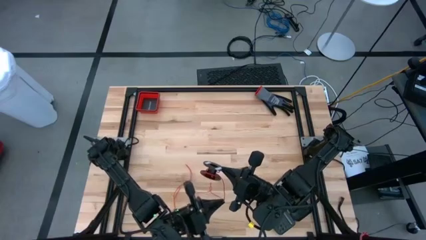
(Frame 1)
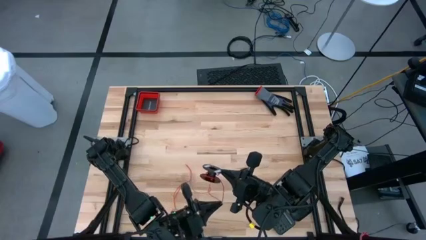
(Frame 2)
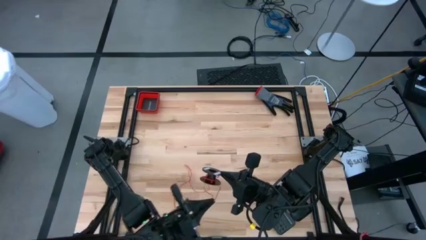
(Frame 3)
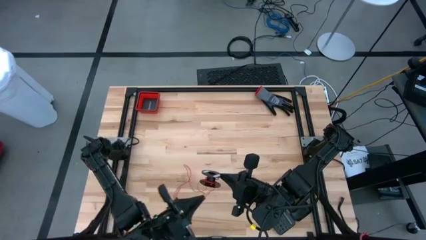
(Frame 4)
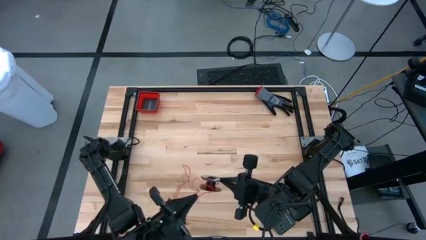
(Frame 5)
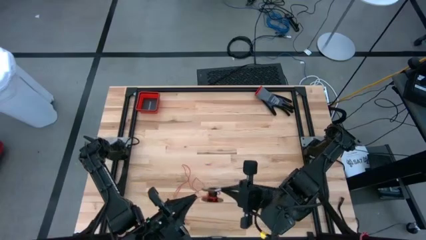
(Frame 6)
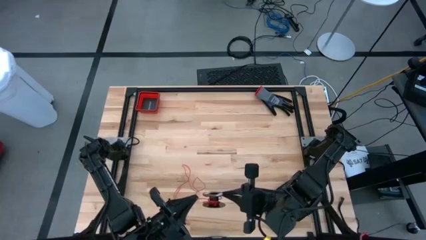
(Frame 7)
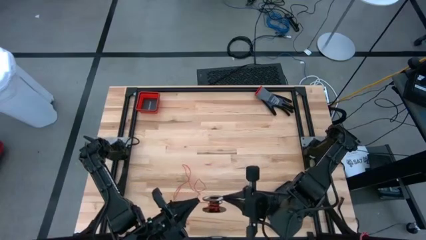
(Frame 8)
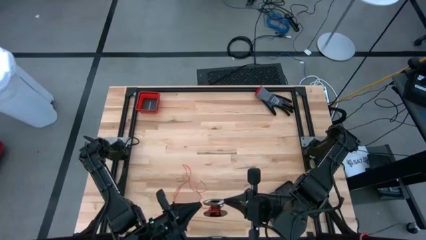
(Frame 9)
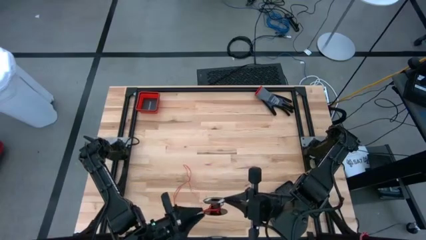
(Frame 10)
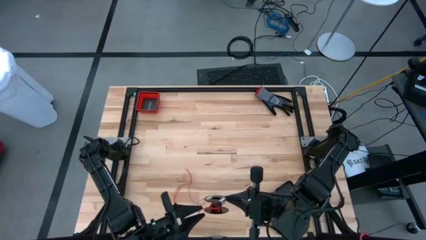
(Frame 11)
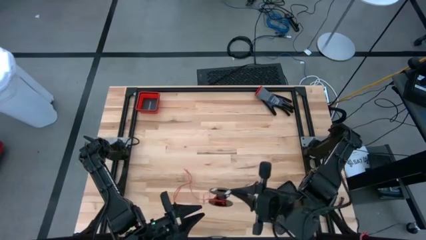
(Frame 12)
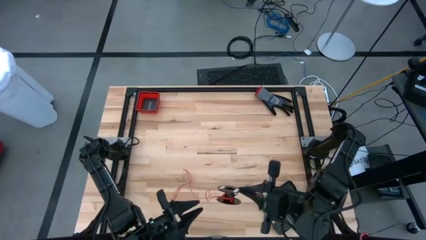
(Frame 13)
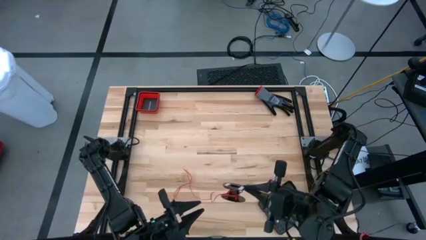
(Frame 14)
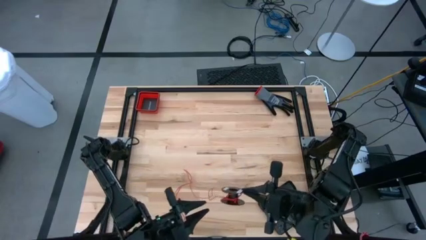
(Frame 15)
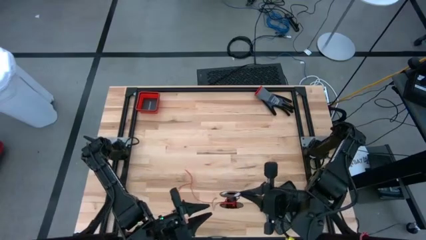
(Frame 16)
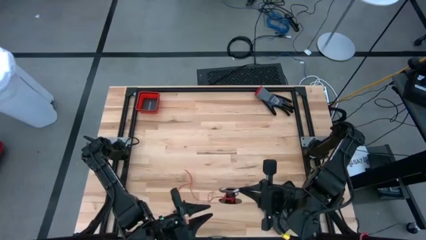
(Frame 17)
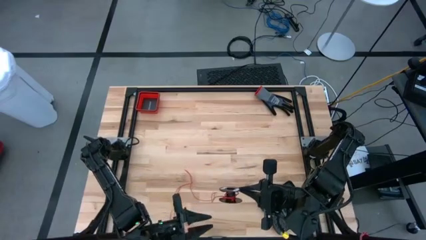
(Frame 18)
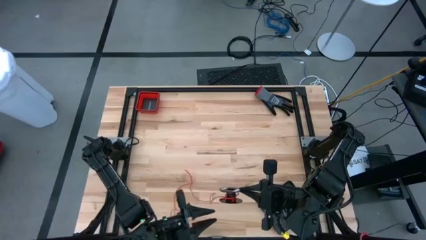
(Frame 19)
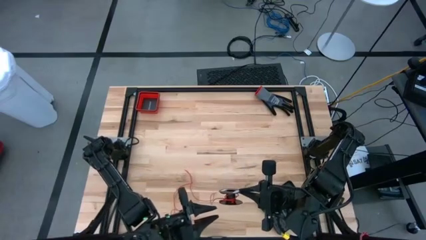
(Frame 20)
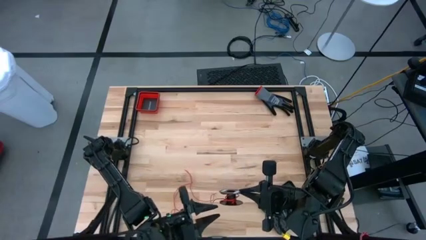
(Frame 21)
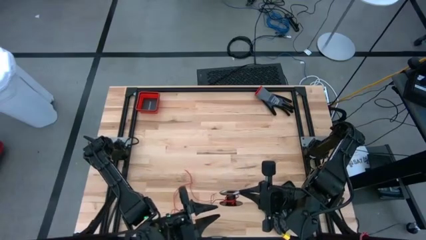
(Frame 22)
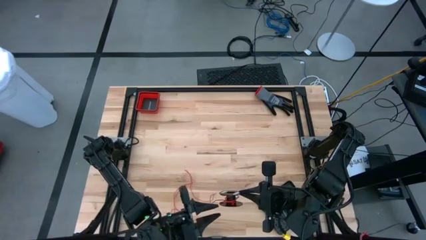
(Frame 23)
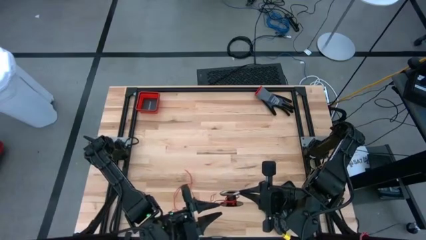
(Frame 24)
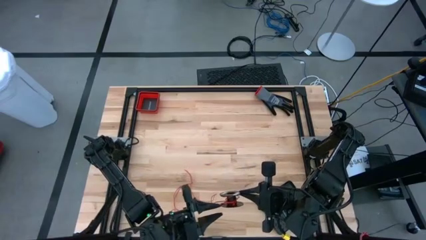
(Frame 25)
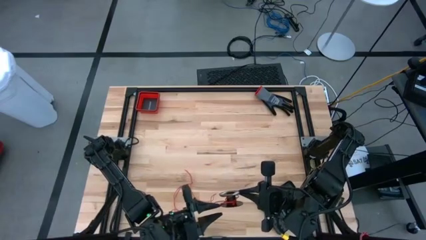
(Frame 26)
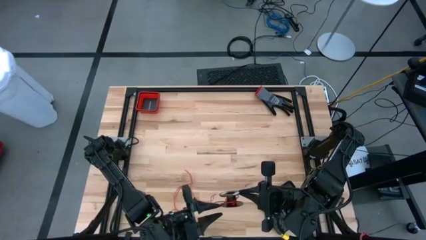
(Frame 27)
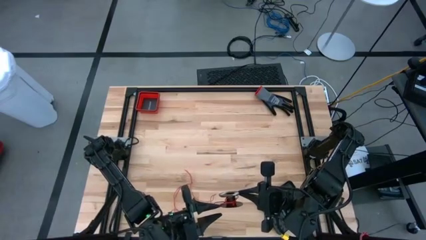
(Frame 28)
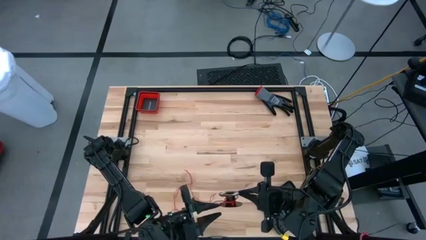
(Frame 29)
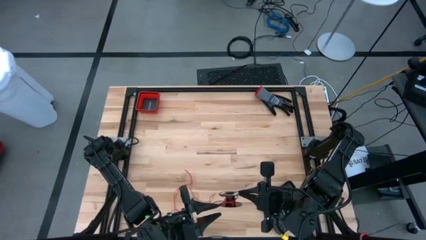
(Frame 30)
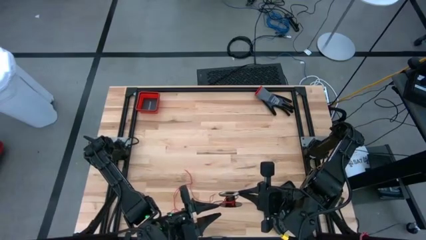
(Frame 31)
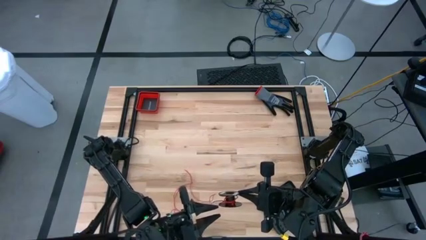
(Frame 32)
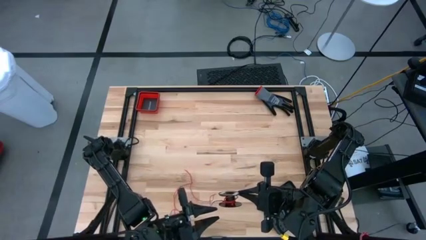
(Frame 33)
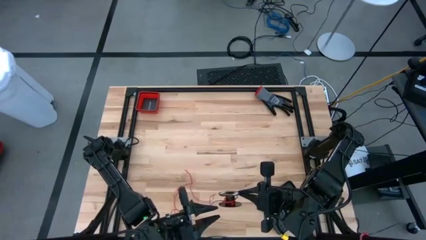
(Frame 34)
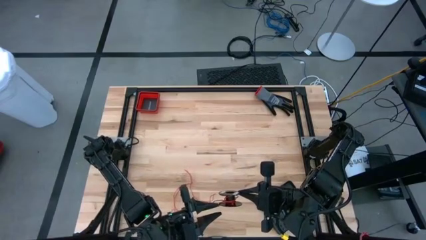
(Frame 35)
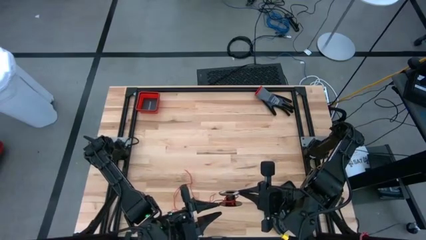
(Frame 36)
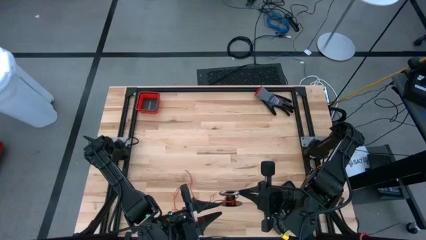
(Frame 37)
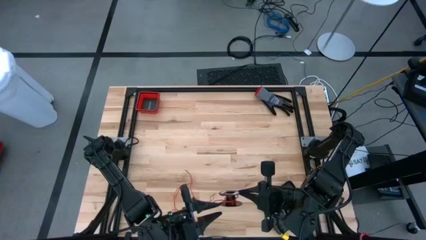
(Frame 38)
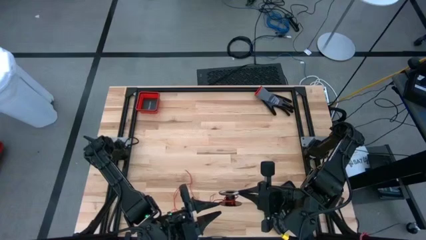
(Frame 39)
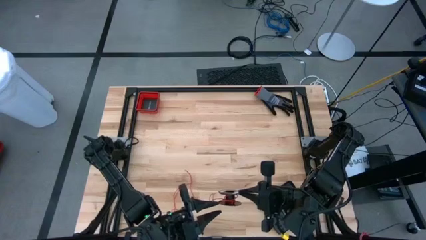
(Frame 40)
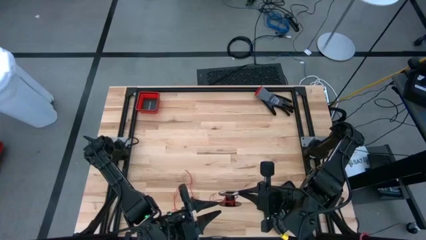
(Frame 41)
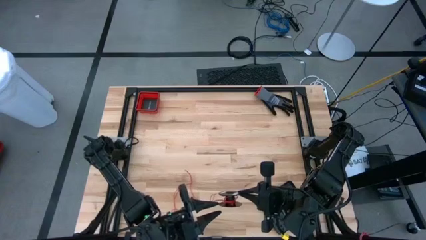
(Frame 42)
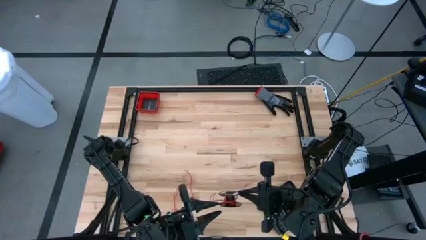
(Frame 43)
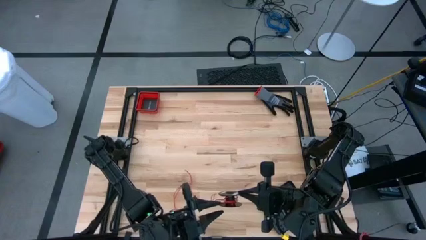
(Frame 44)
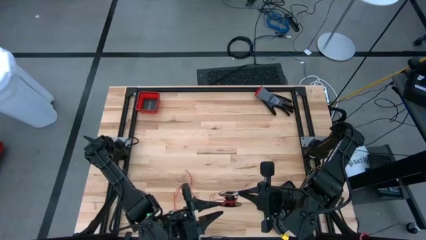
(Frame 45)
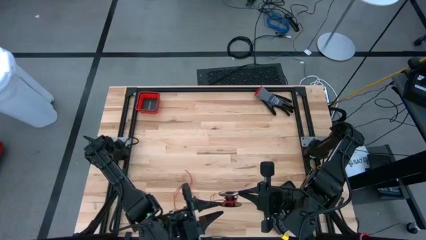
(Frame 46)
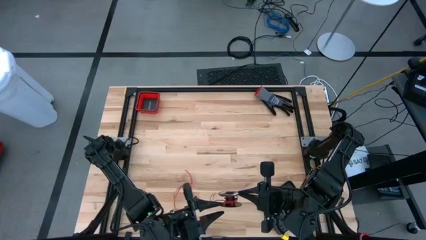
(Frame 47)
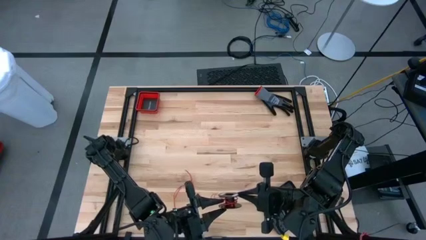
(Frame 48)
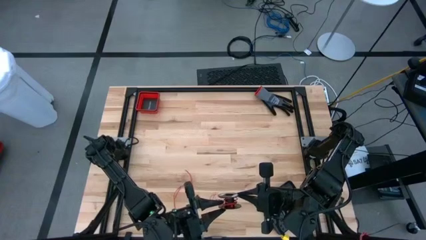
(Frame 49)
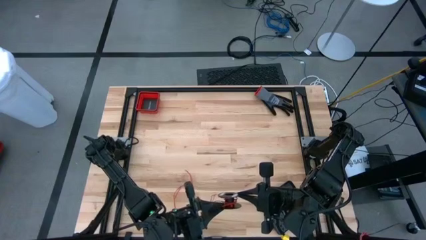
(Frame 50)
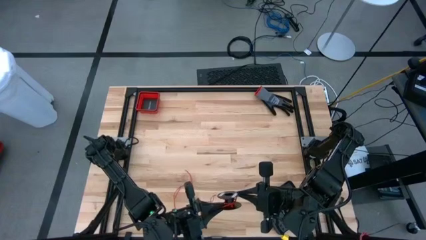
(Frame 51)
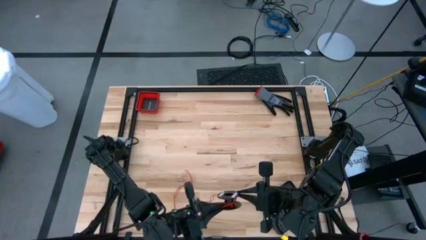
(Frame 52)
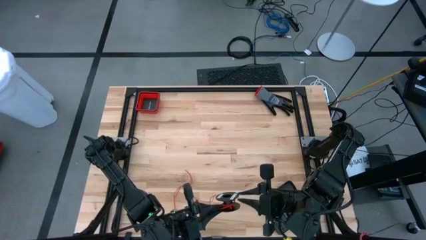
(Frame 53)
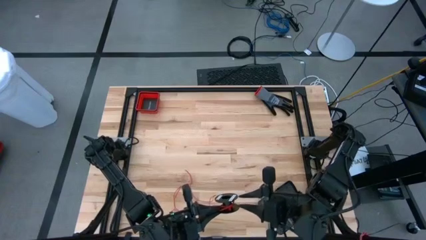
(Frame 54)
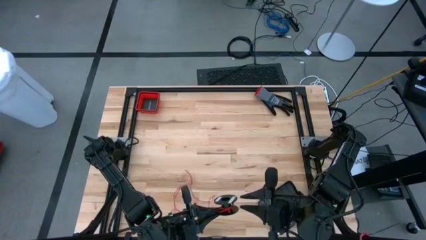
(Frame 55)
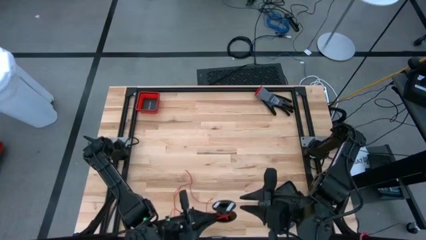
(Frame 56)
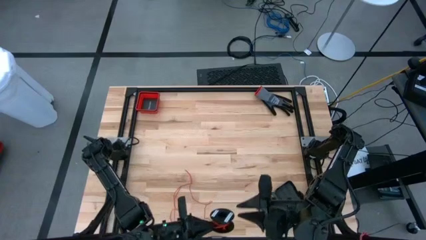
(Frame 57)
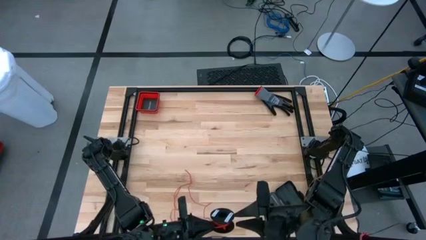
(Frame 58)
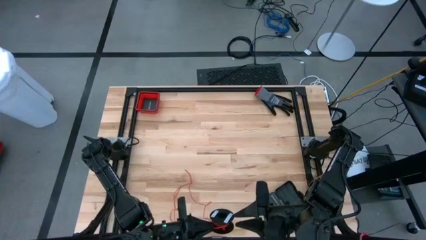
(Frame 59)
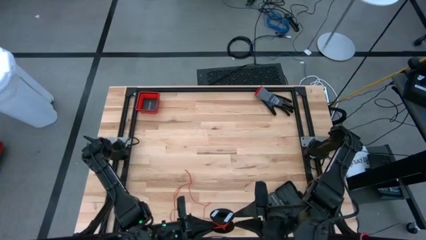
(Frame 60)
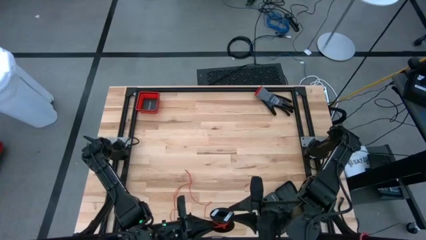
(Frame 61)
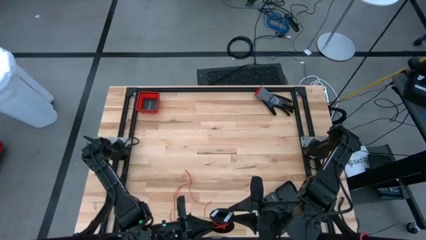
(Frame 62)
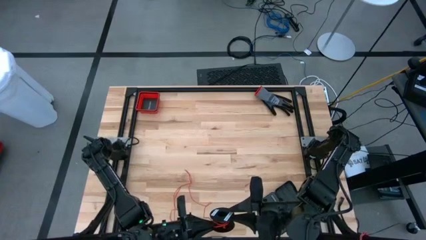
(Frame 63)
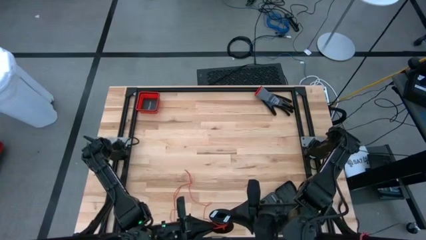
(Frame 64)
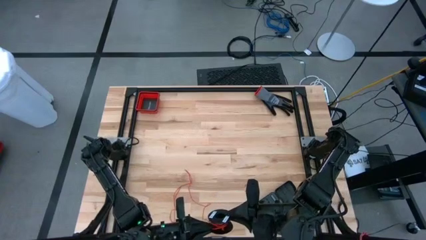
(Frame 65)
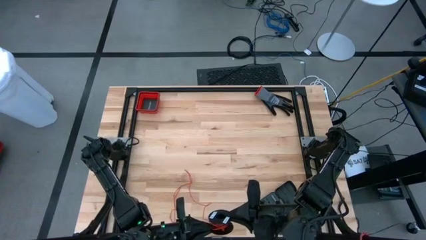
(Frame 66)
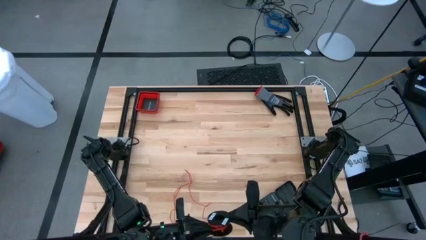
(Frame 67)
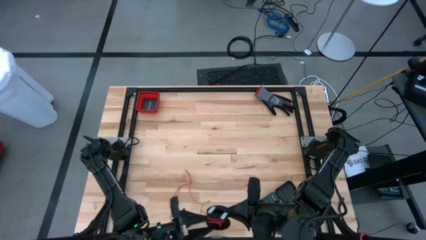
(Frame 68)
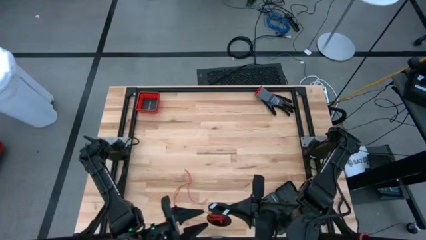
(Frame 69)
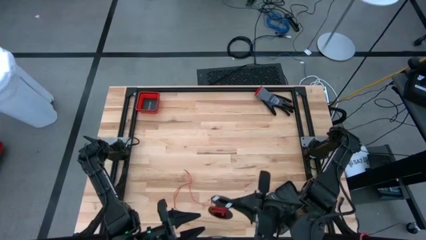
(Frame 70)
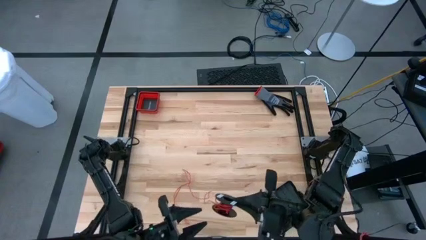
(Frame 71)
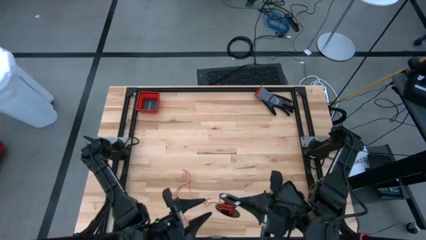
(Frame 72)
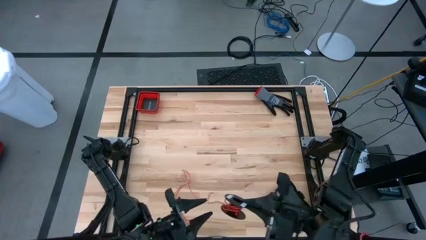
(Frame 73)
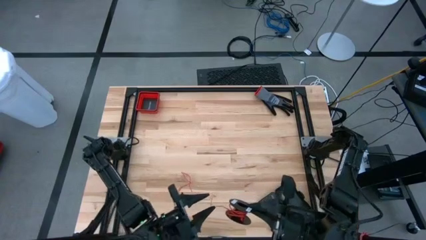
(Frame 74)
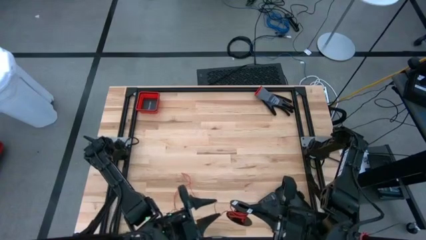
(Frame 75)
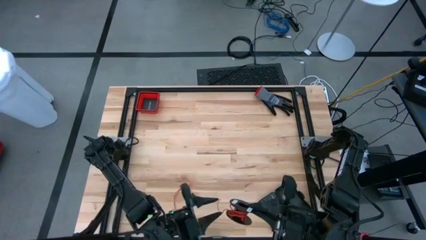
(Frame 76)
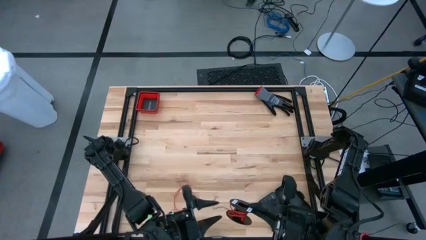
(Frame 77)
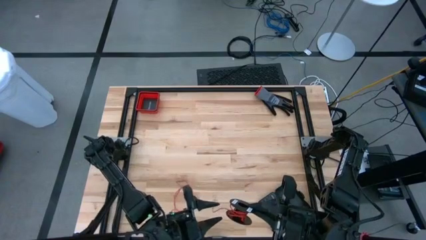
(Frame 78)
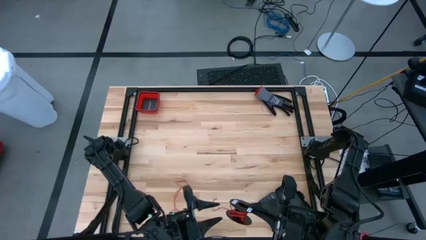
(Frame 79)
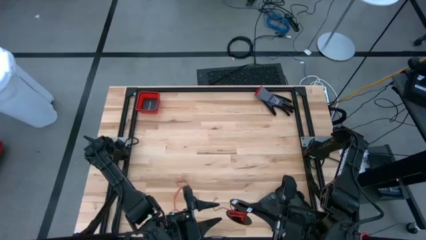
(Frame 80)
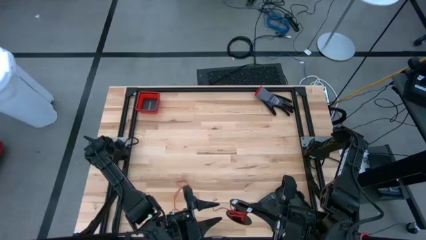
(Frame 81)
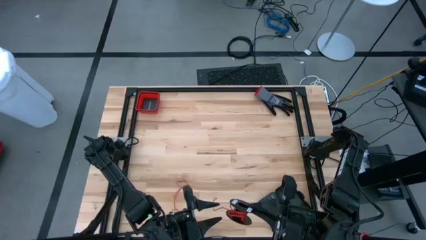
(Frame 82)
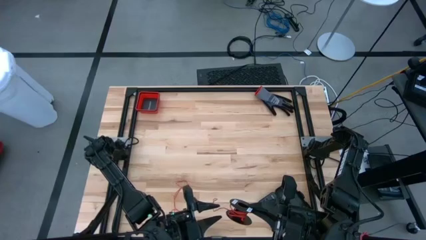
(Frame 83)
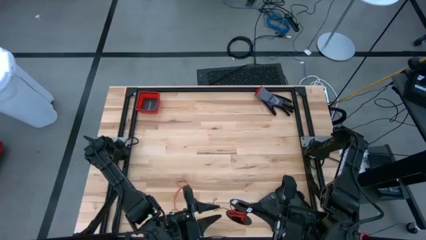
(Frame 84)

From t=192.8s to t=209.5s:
Task: Coil cords
Coil the red wire onto the spool
